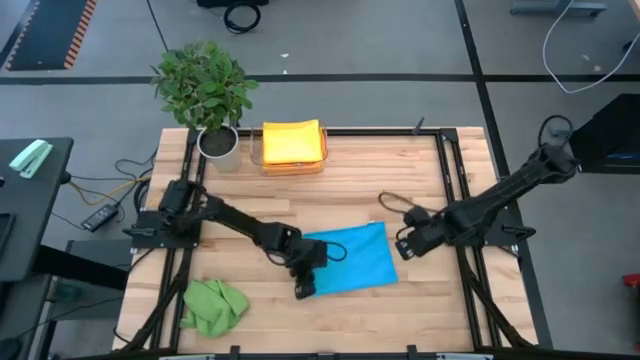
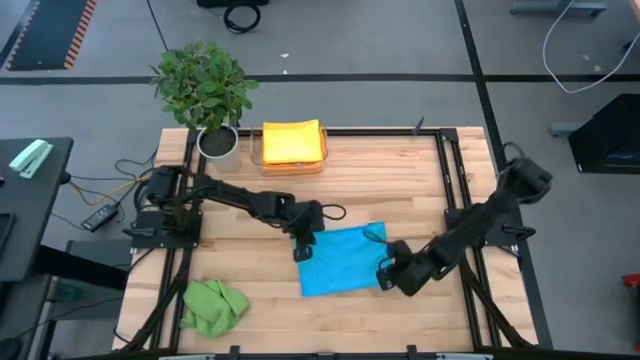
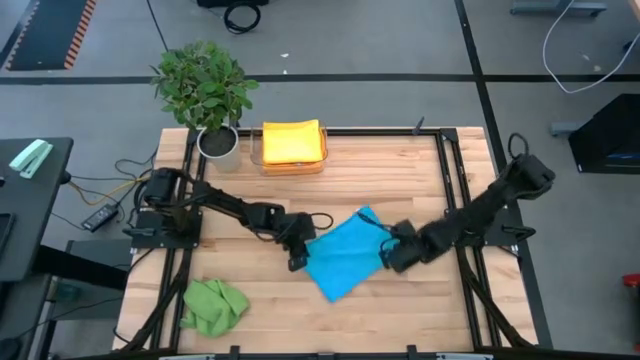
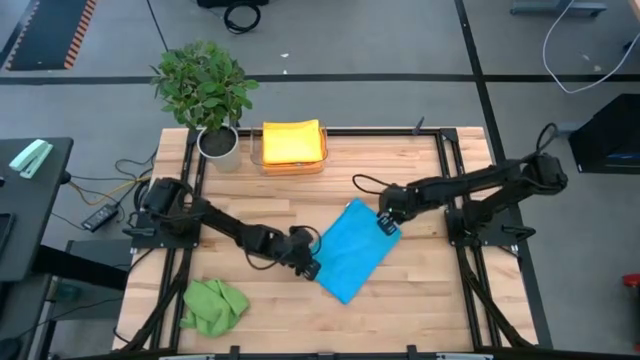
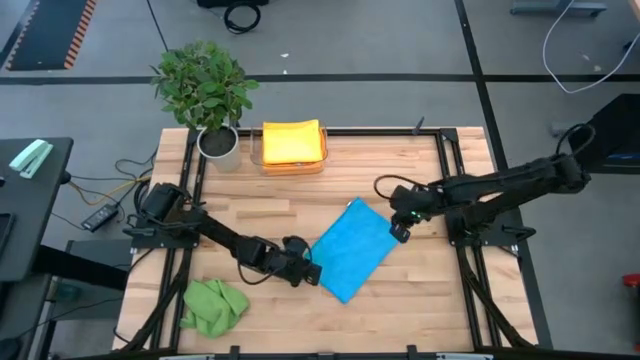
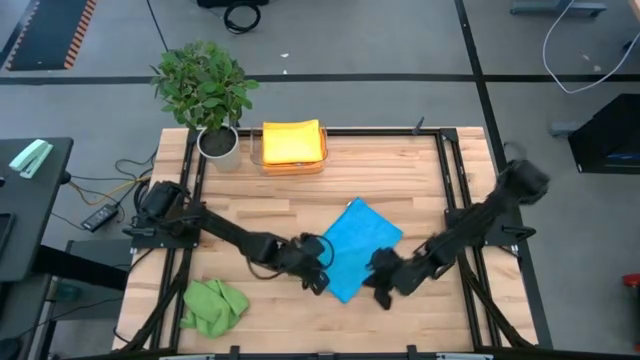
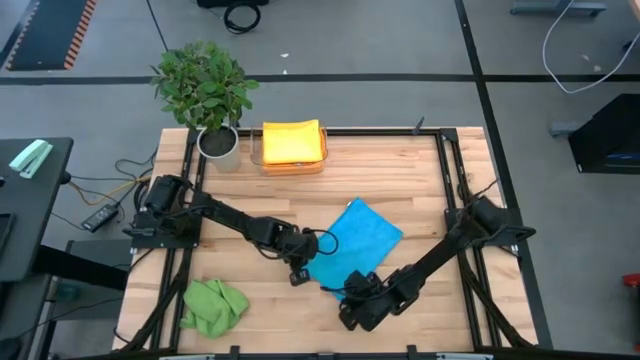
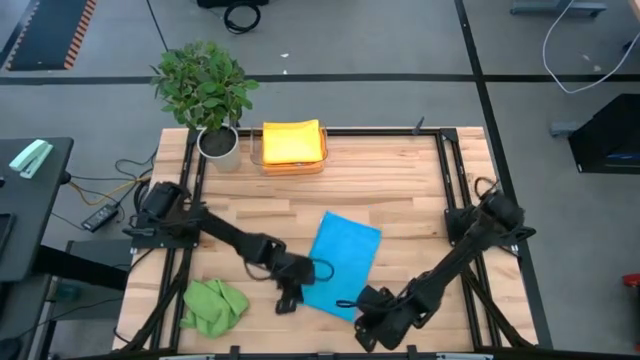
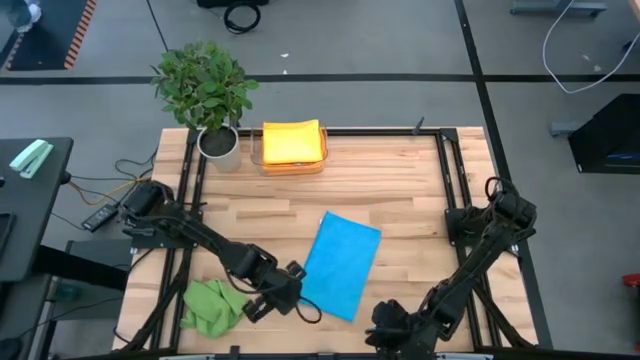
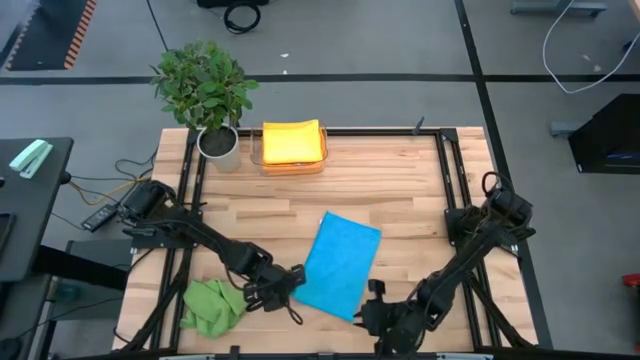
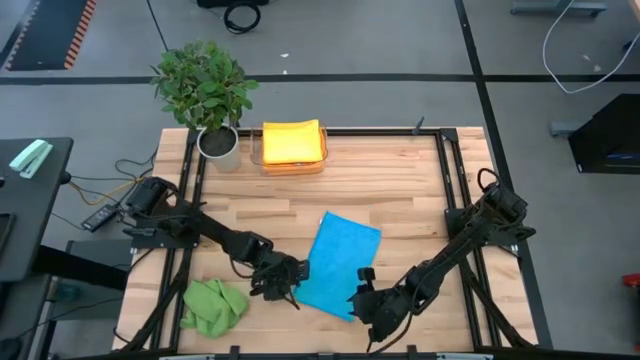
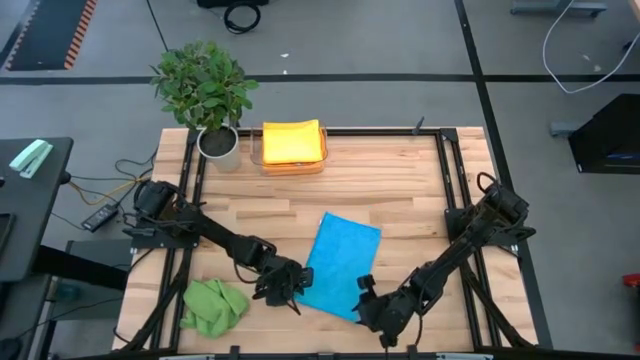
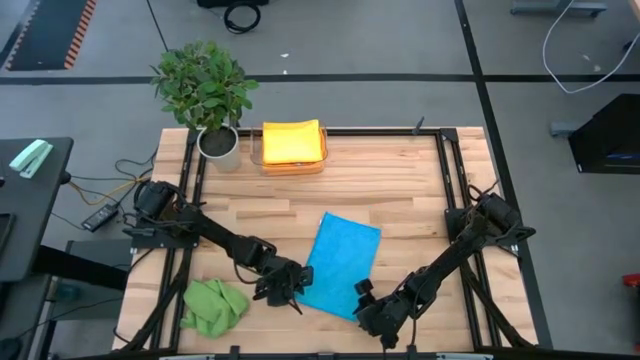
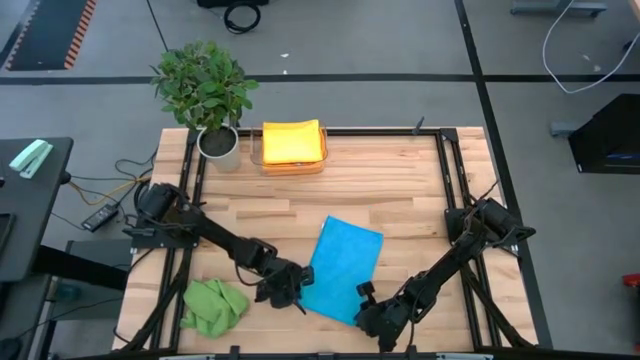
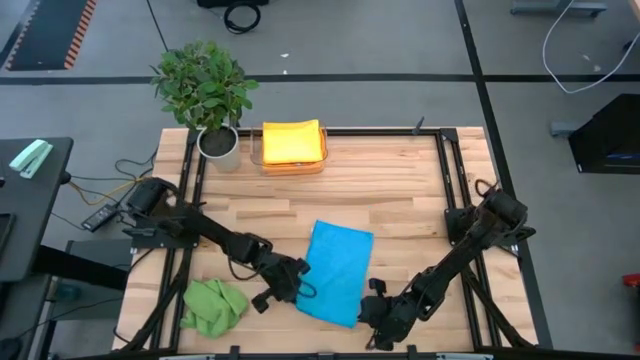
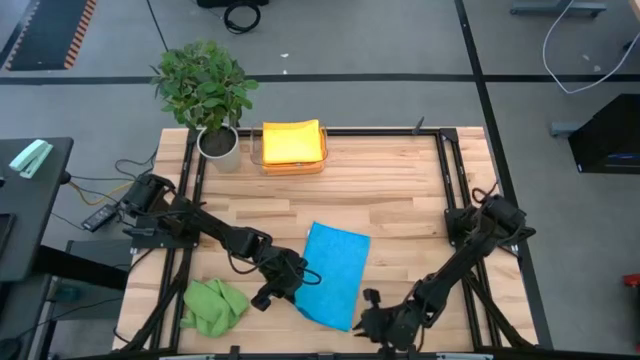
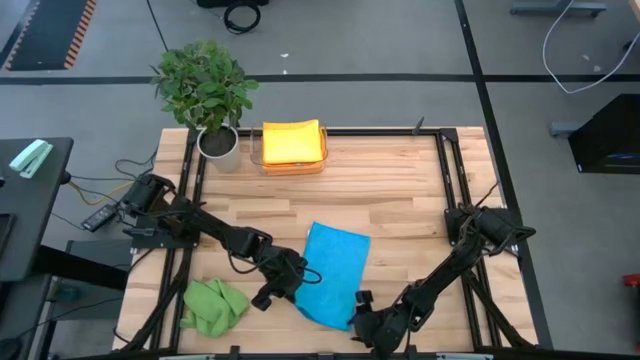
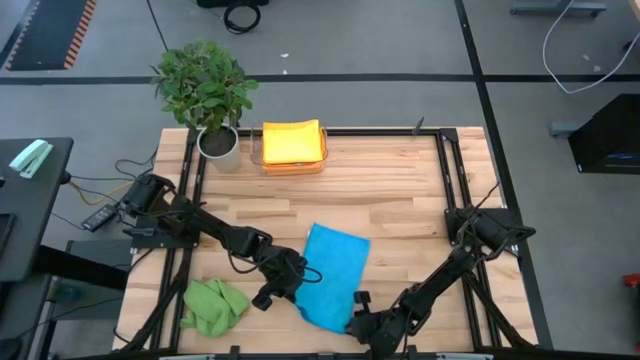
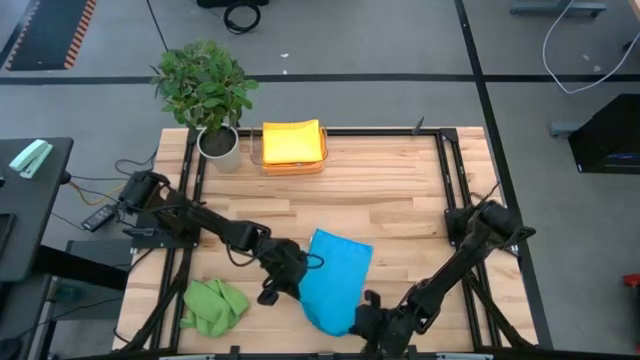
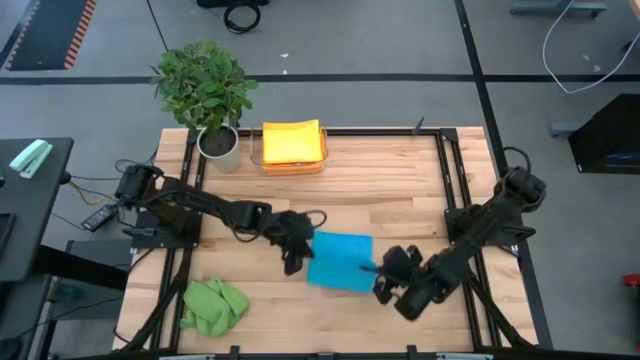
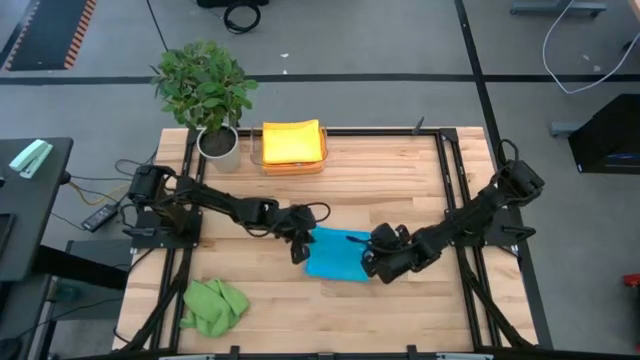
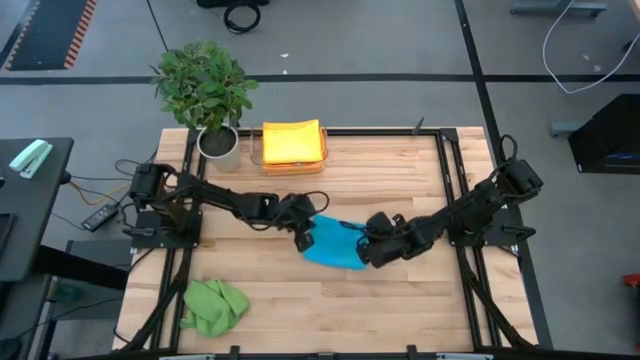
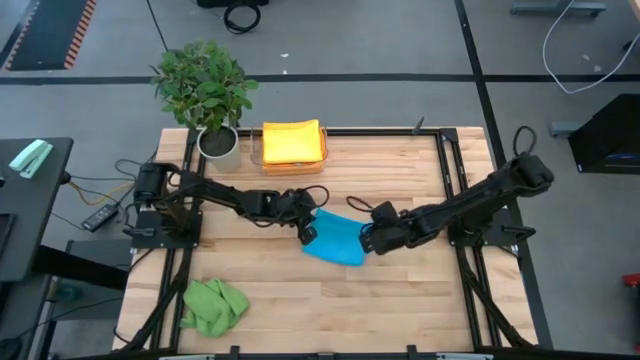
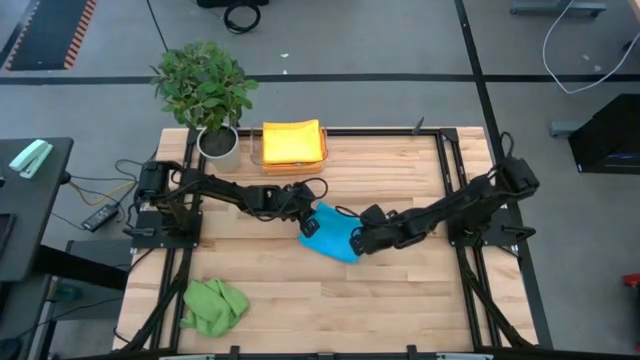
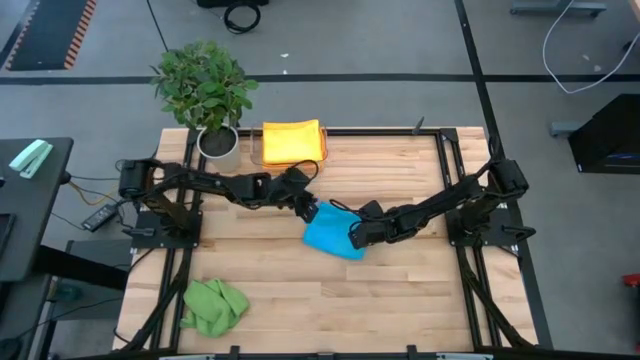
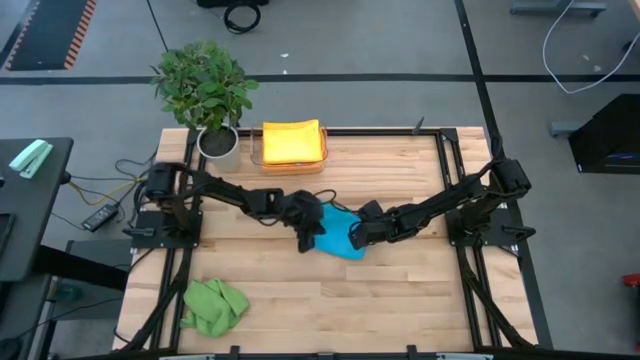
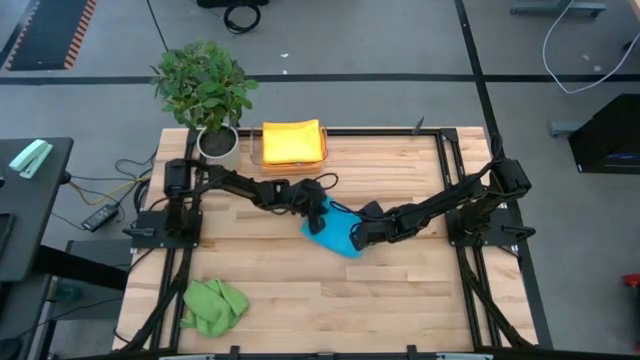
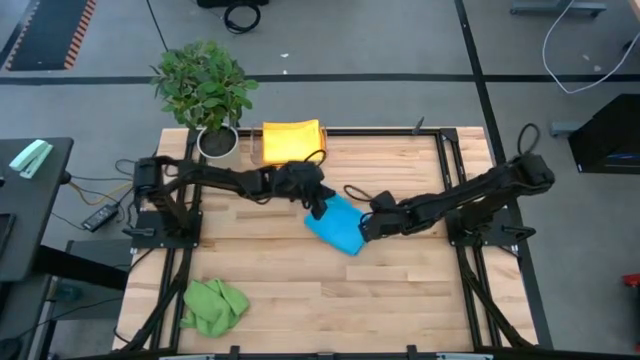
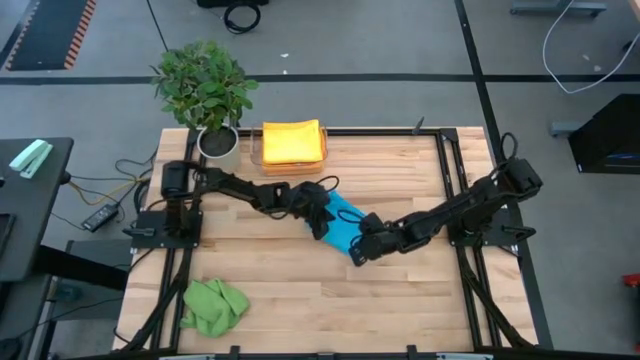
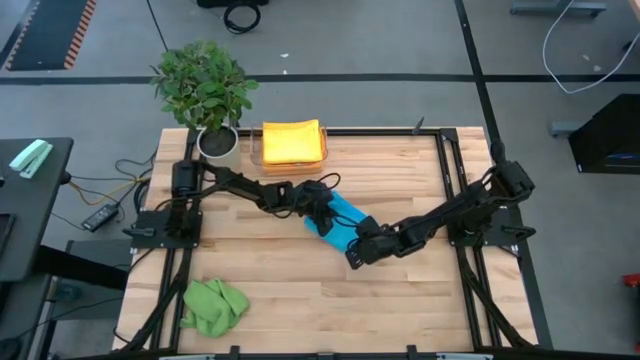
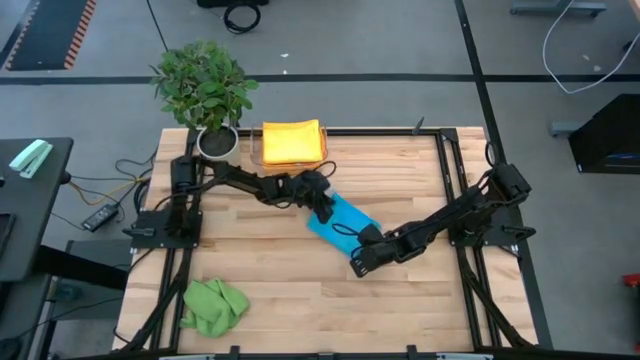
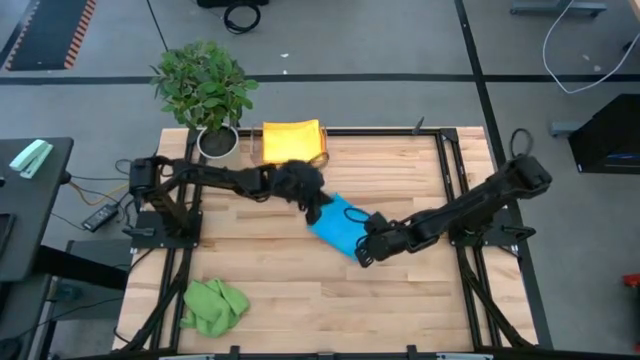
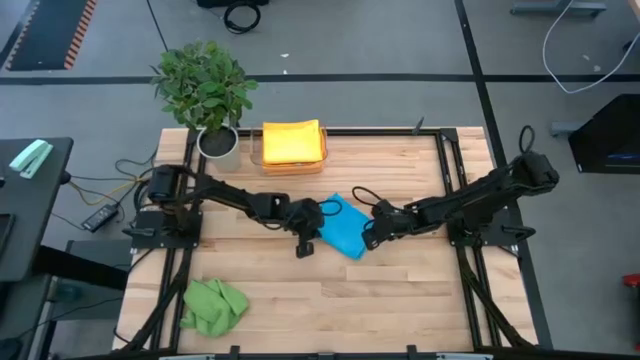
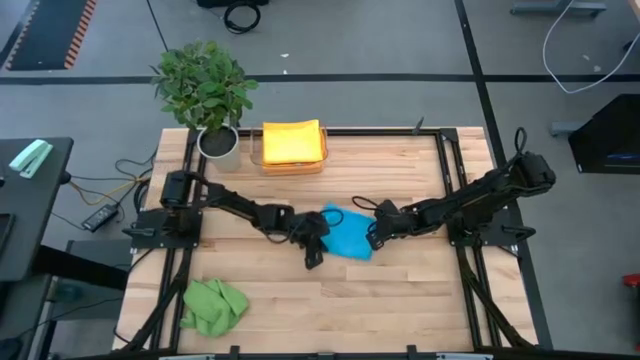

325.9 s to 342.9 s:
Task: Fold microfiber towels
Fold the blue microfiber cloth

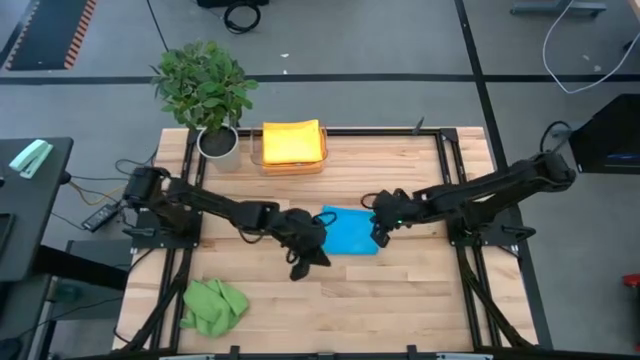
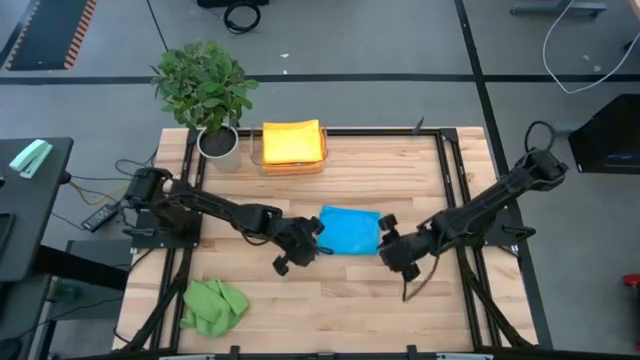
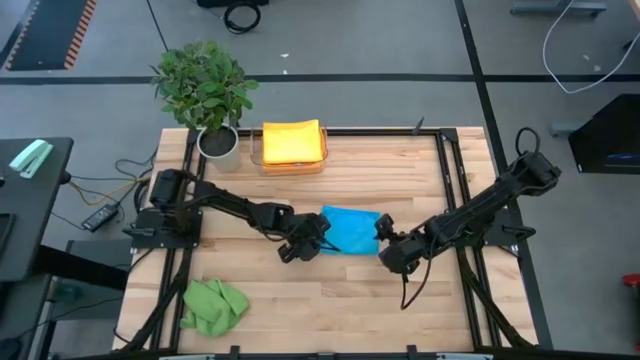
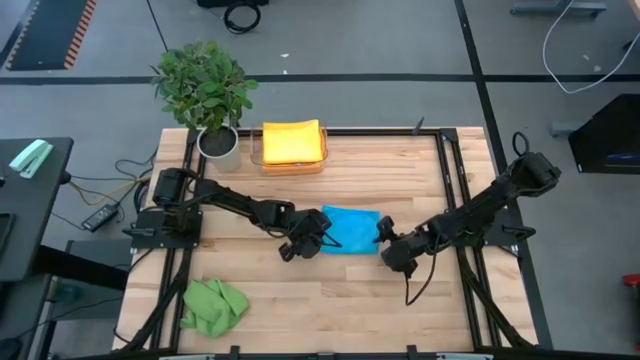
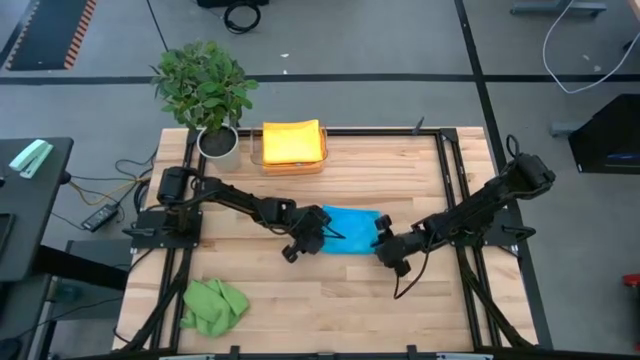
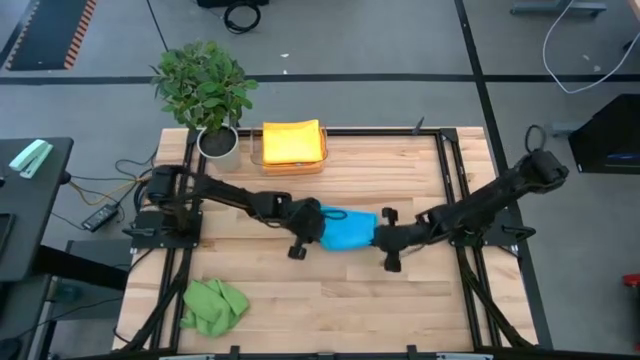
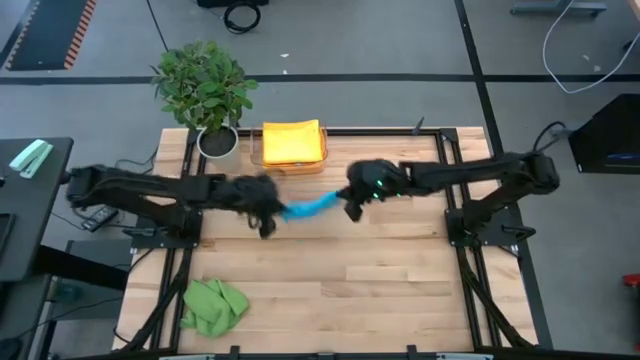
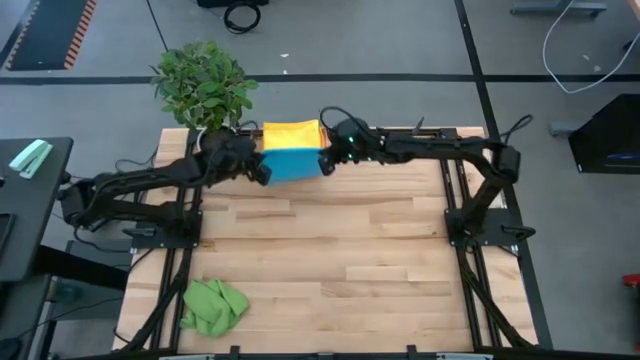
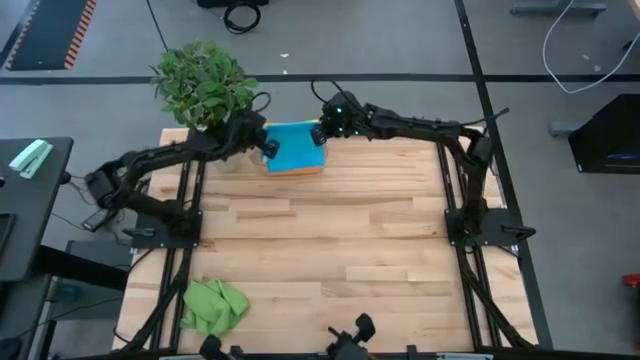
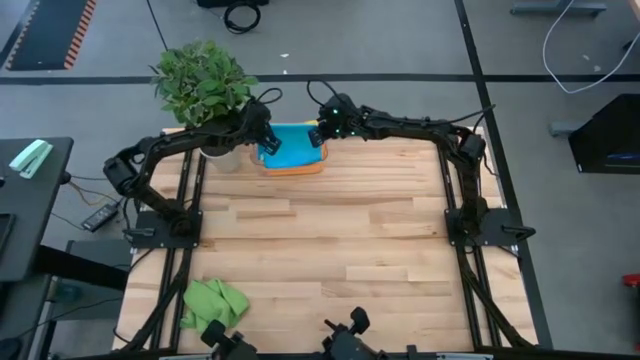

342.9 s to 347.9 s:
Stack the folded blue microfiber cloth on top of the yellow microfiber cloths in the transparent bin
